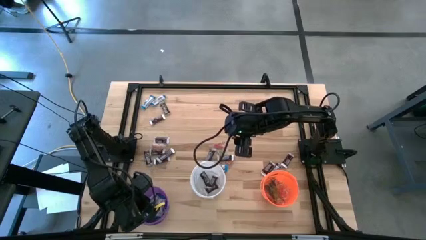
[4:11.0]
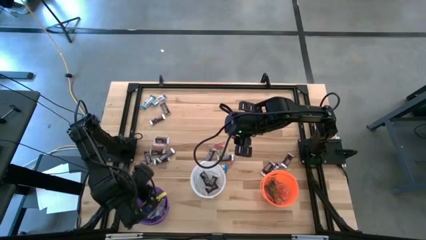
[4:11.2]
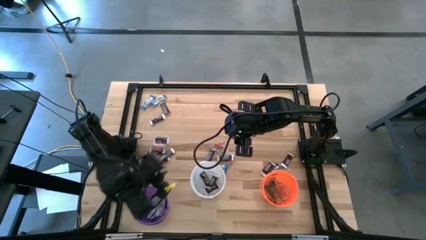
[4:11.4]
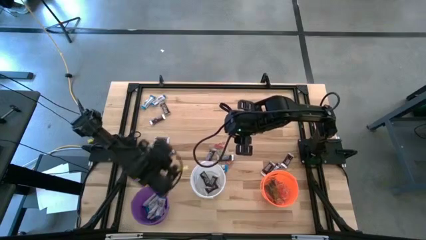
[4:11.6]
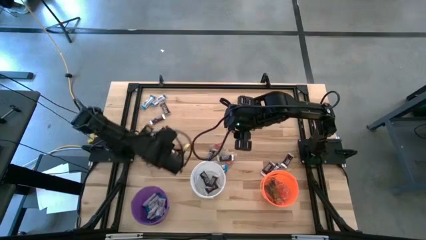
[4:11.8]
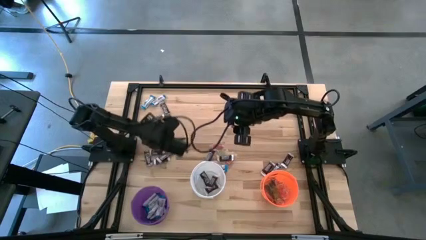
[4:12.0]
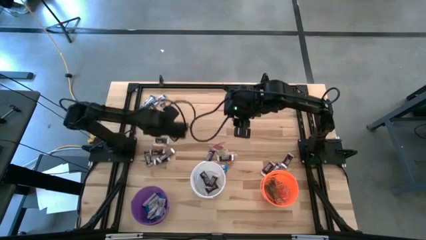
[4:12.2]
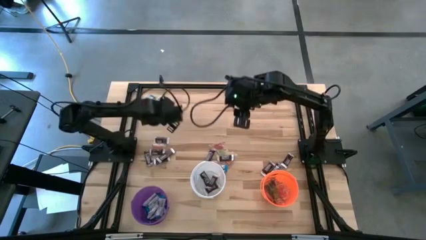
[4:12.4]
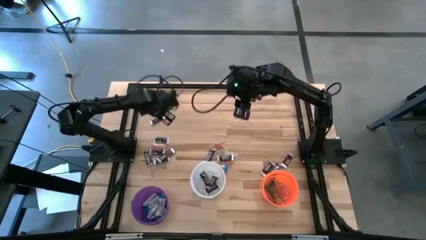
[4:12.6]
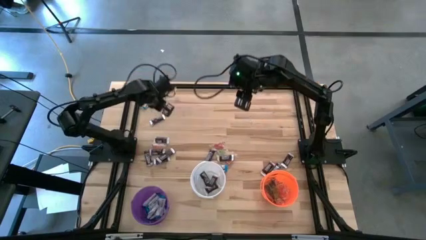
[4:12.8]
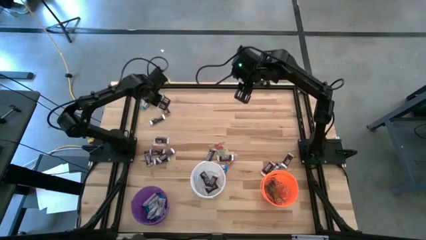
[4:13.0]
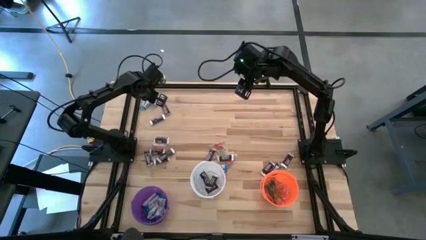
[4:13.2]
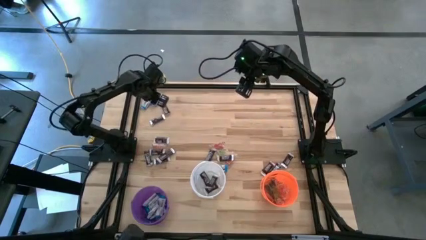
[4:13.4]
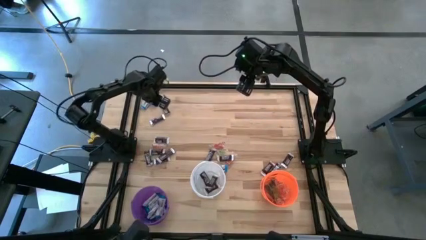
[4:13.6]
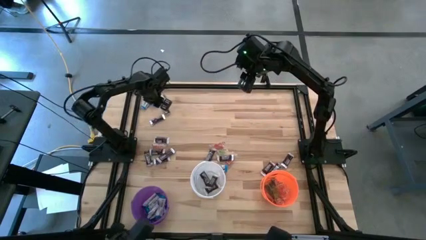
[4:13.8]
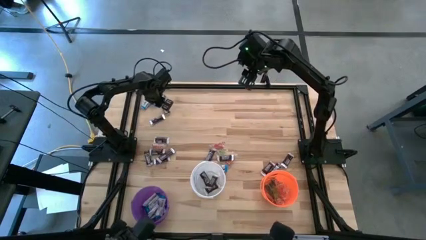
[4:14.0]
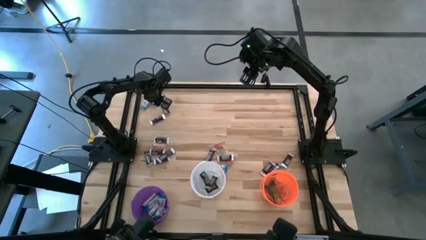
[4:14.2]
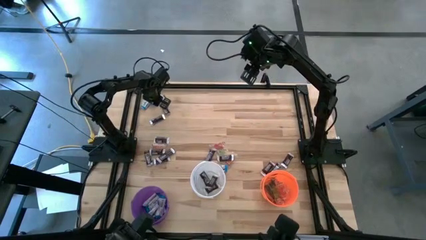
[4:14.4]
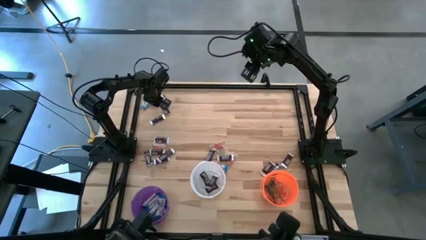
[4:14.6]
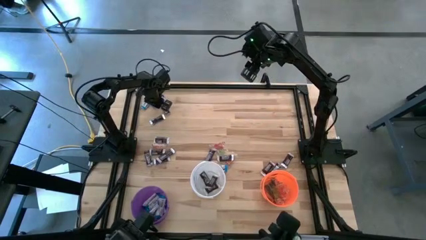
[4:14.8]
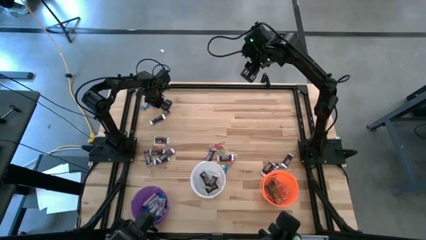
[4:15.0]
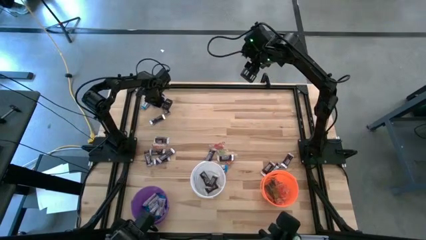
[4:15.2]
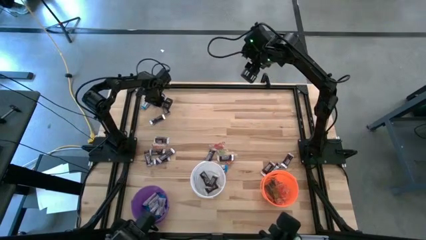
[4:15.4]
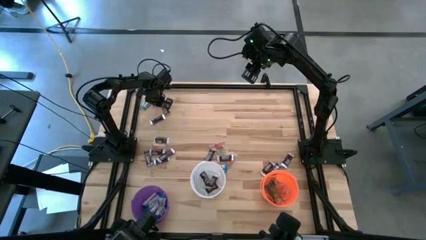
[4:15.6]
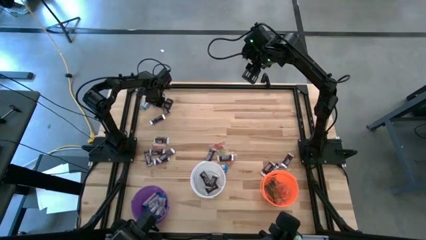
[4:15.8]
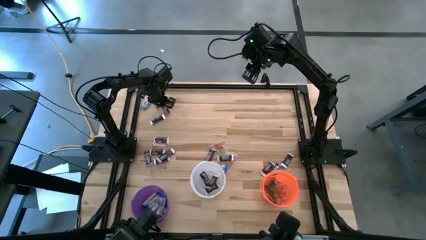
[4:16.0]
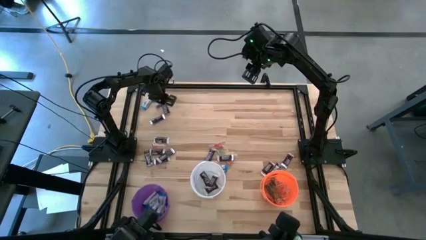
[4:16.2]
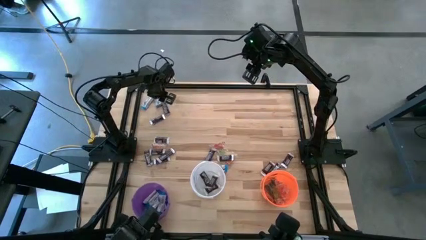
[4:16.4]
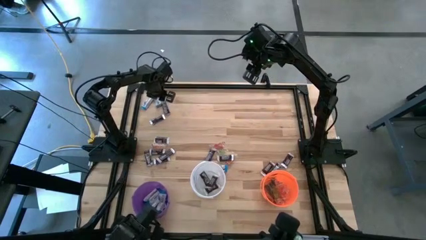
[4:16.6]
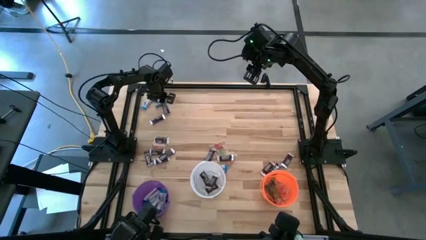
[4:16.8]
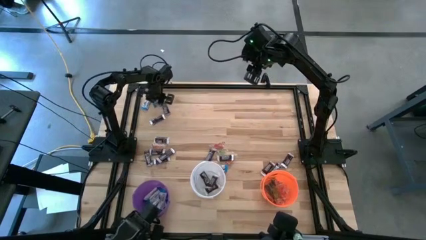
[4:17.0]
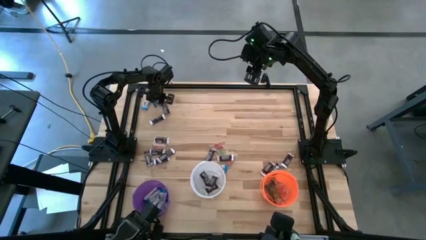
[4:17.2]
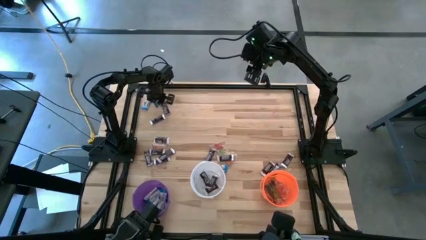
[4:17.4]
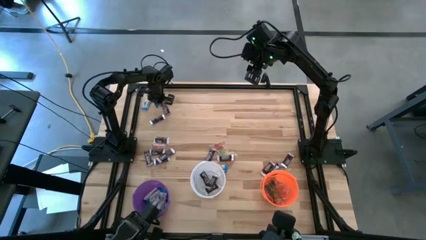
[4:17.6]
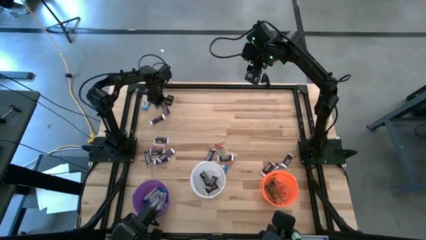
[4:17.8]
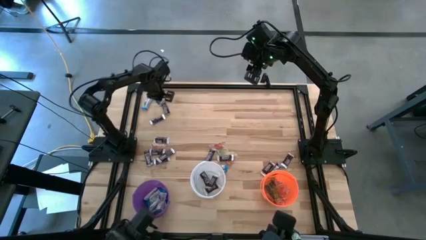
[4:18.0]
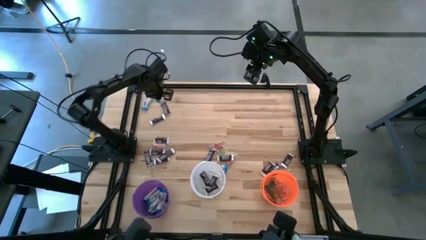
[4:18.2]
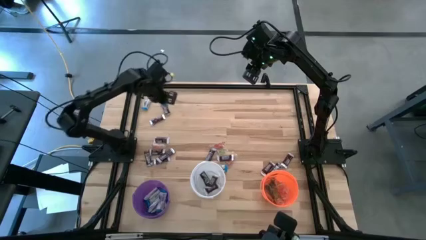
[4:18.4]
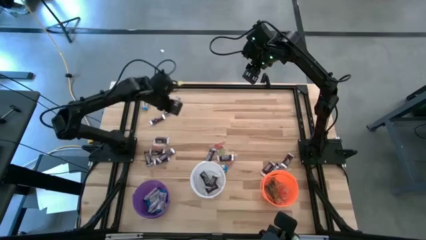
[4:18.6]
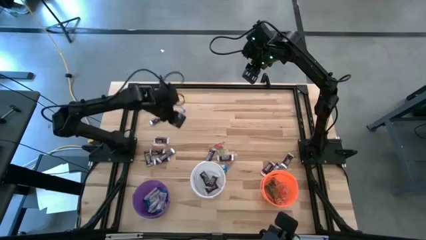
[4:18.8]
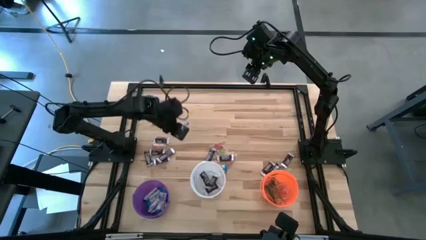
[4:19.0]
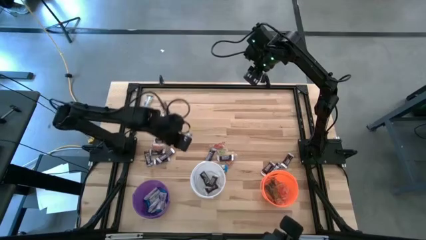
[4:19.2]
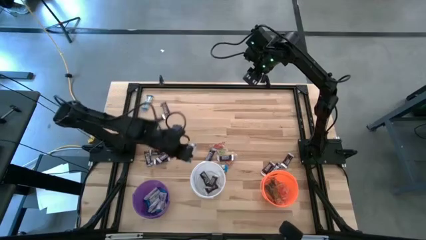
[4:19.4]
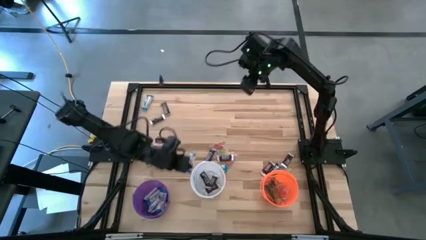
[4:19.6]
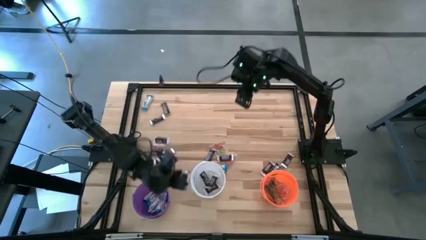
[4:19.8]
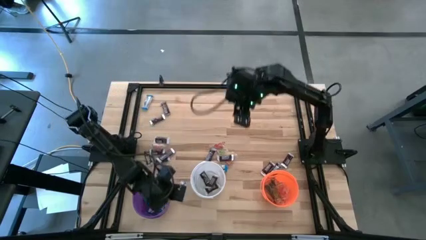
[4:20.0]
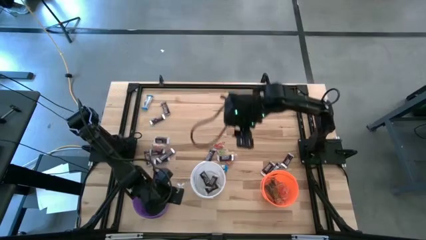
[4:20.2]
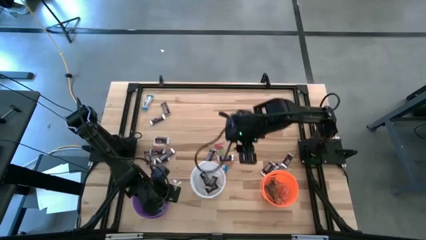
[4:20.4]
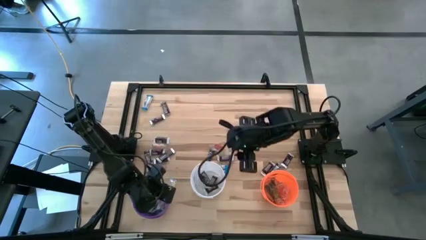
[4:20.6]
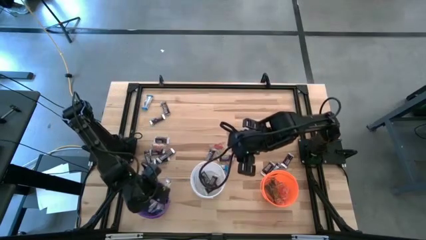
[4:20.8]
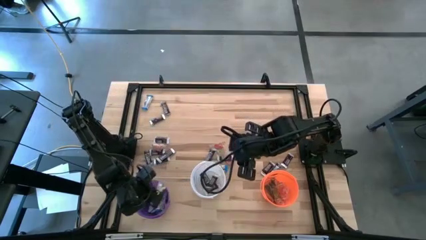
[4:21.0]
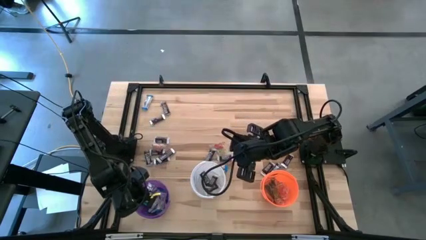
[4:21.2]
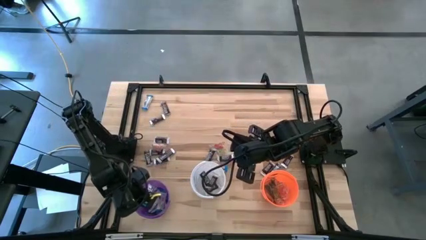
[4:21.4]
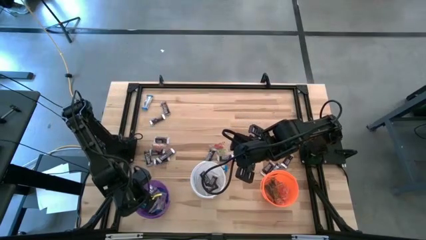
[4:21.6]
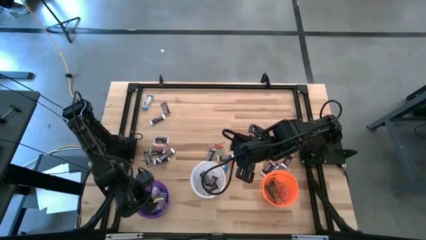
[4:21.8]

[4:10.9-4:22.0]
Task: Sort candy
Put the white chocolate into the violet bucket

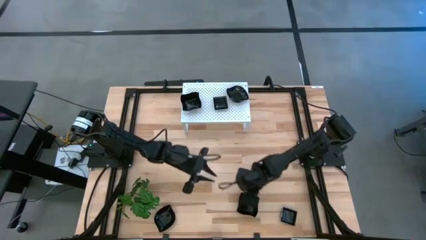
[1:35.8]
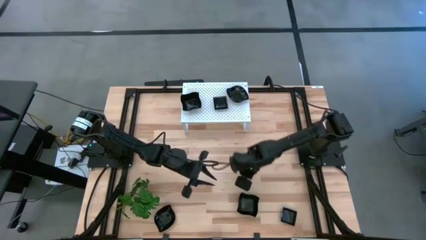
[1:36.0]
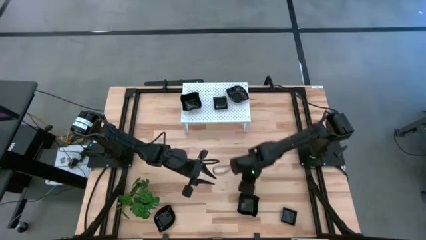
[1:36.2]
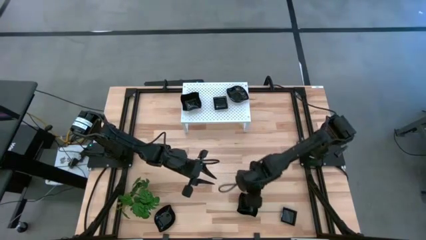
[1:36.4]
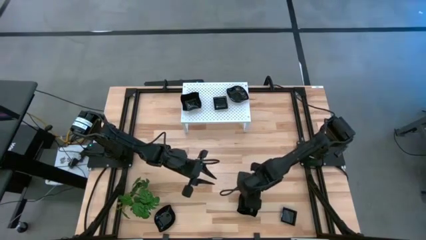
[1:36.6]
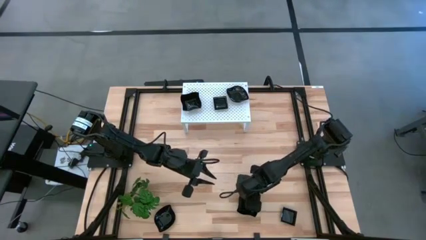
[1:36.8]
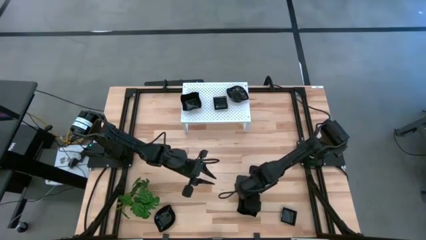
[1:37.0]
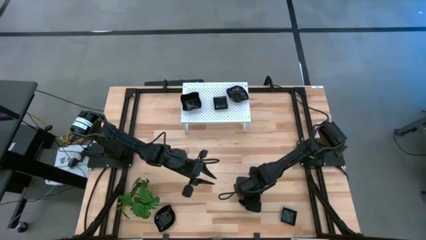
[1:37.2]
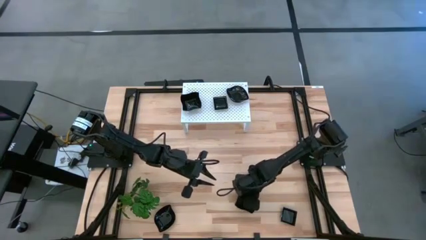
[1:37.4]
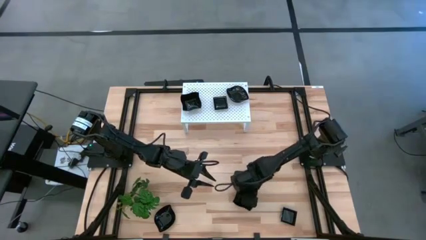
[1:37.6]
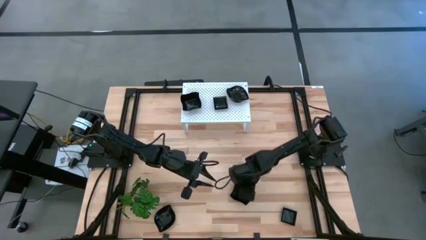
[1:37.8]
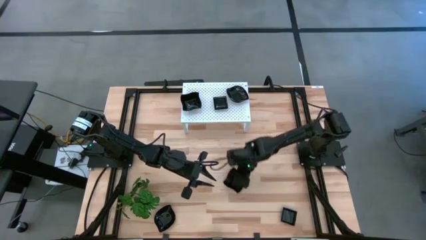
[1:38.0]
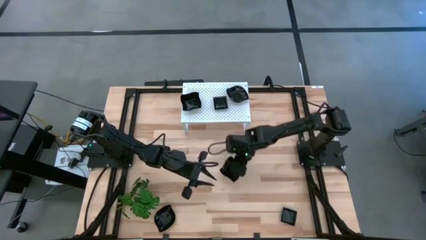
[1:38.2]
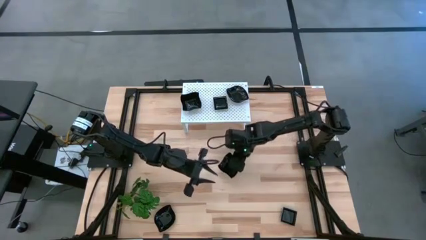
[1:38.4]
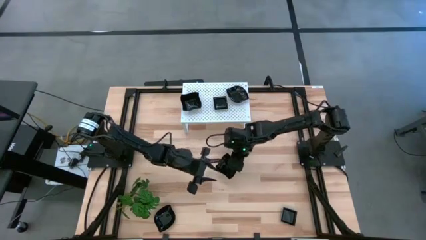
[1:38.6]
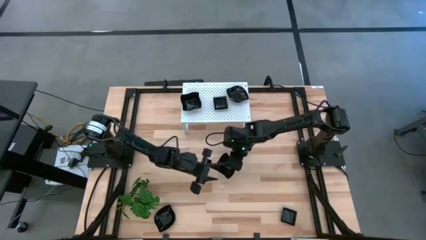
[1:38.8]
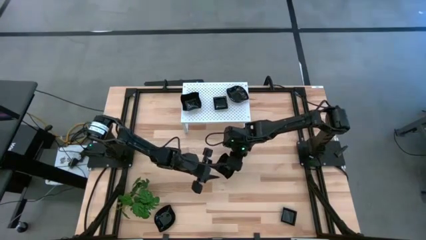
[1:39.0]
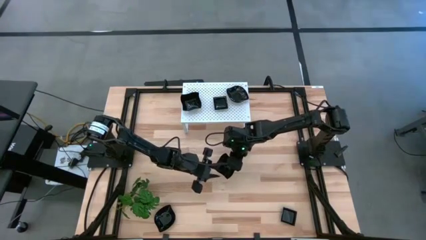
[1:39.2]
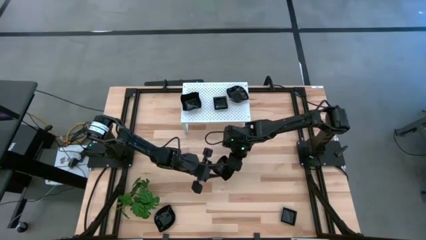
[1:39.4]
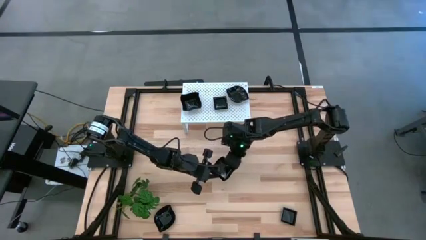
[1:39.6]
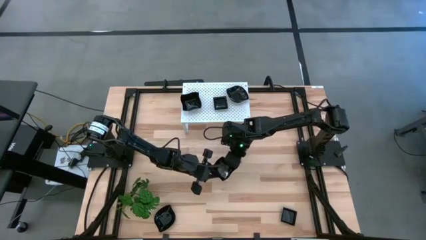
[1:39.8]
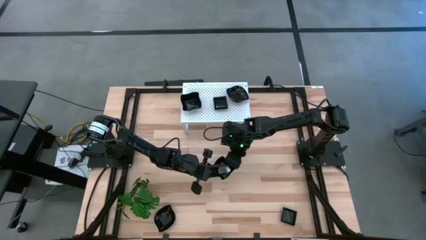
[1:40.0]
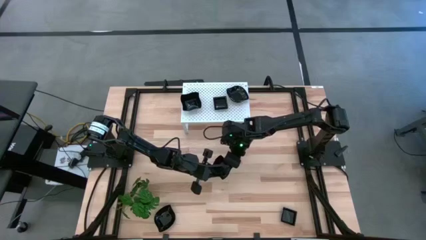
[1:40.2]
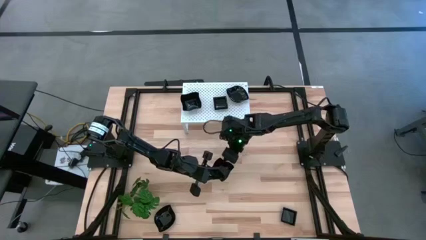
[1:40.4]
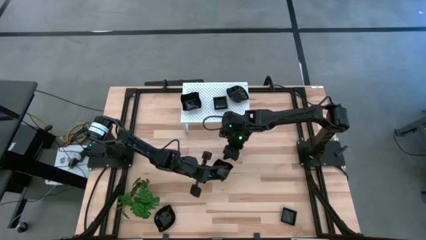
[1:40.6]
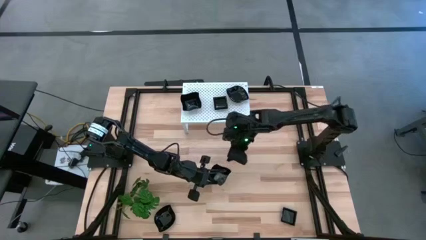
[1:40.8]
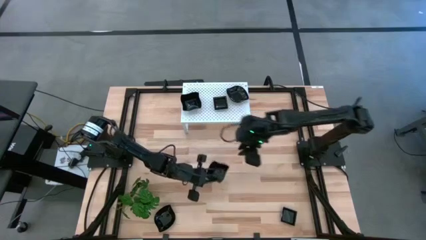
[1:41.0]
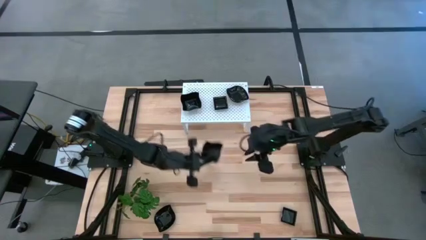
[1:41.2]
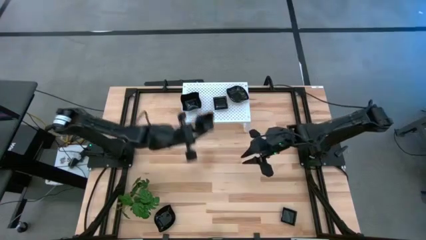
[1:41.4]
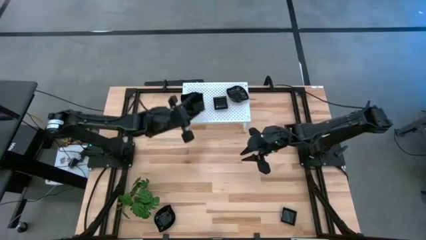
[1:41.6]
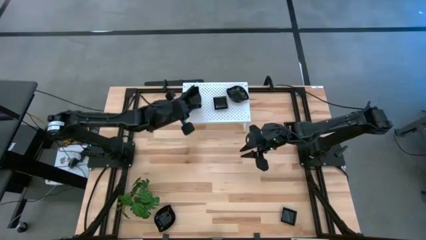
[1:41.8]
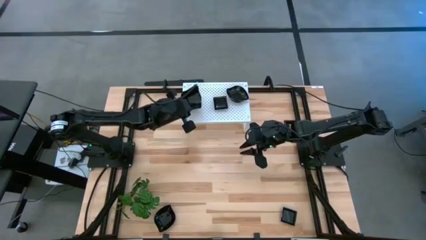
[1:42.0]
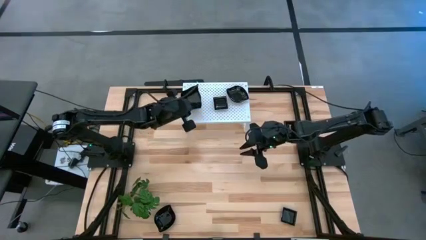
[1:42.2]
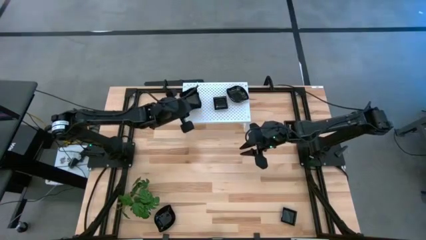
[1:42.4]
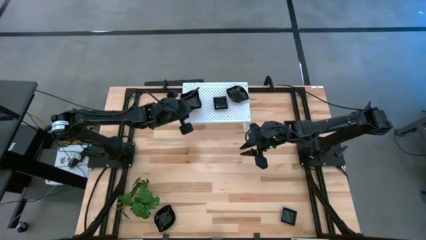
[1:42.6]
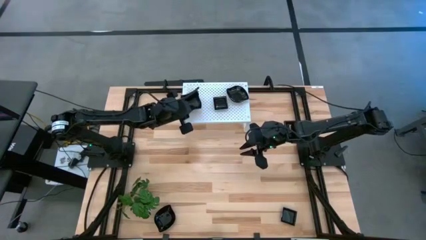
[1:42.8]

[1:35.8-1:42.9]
Task: Pick & Place Mini shaped plates
Stack the distorted square plate on top of the other distorted square plates on the shelf
